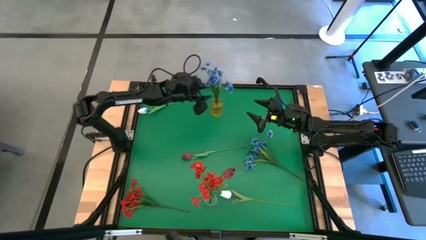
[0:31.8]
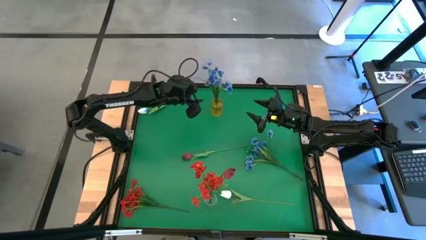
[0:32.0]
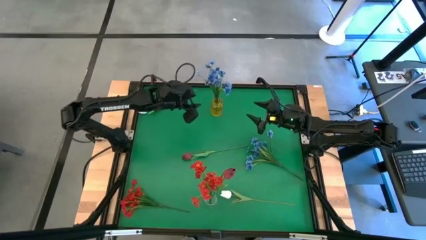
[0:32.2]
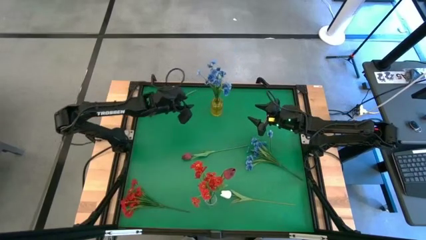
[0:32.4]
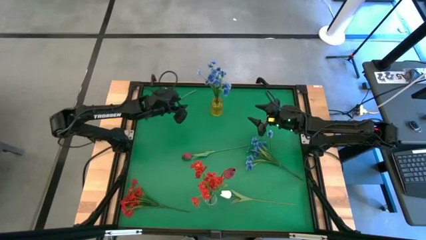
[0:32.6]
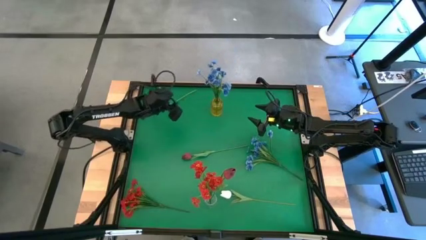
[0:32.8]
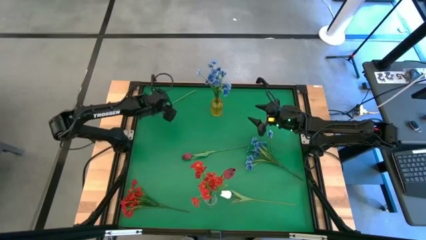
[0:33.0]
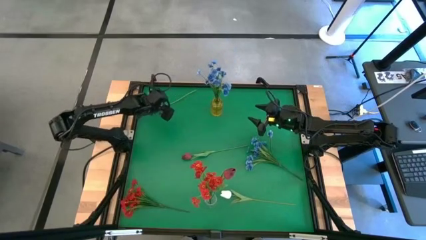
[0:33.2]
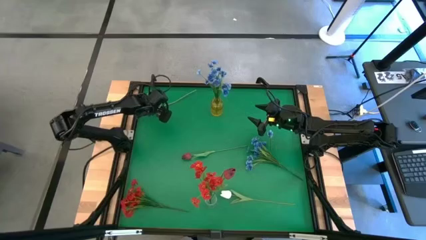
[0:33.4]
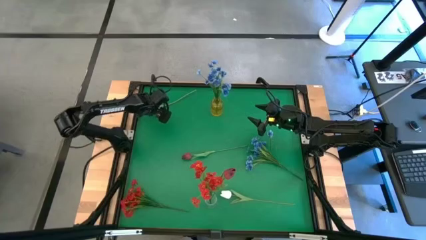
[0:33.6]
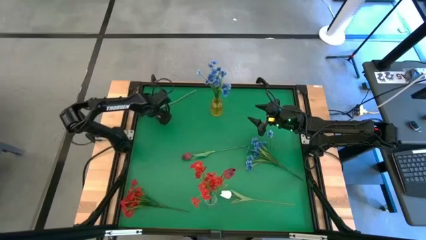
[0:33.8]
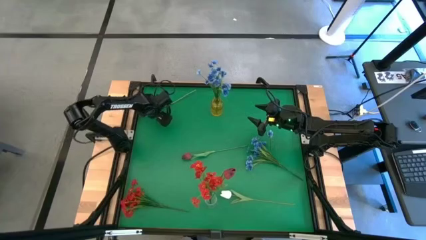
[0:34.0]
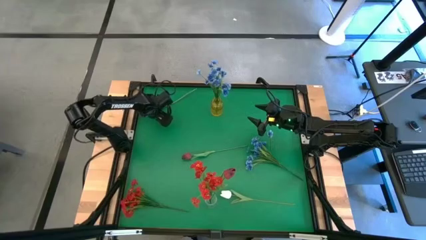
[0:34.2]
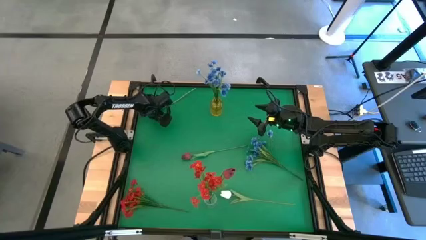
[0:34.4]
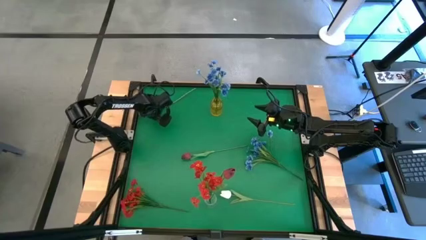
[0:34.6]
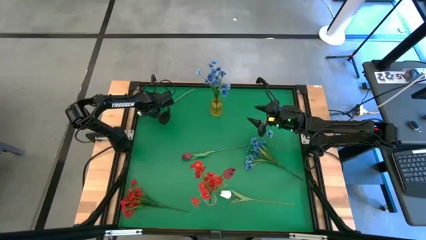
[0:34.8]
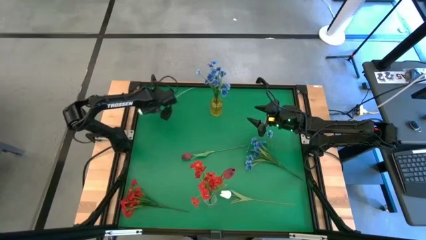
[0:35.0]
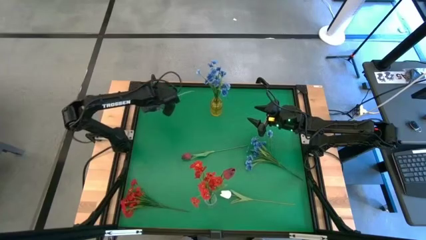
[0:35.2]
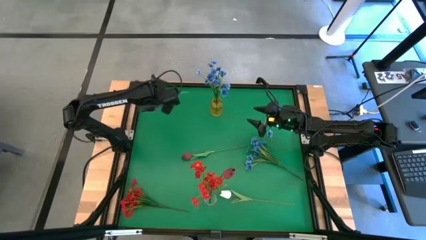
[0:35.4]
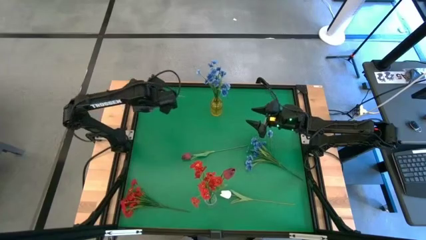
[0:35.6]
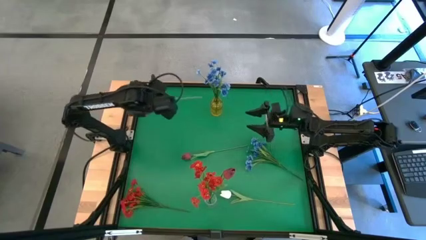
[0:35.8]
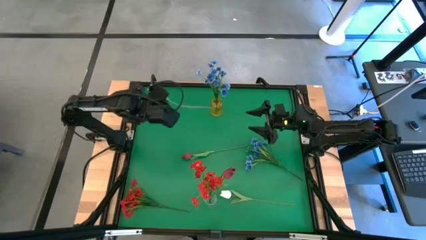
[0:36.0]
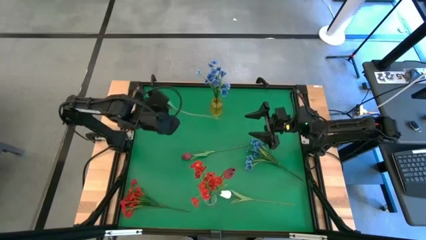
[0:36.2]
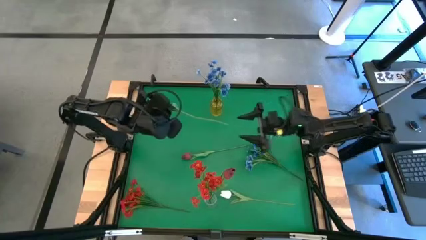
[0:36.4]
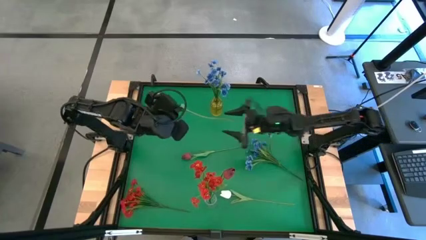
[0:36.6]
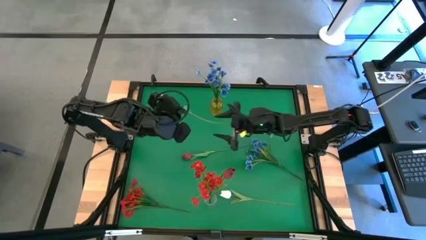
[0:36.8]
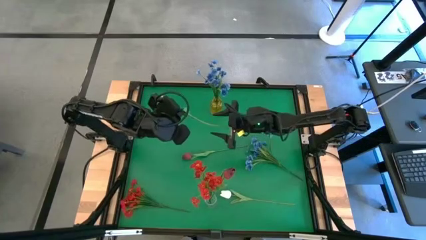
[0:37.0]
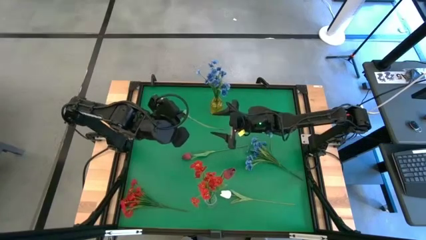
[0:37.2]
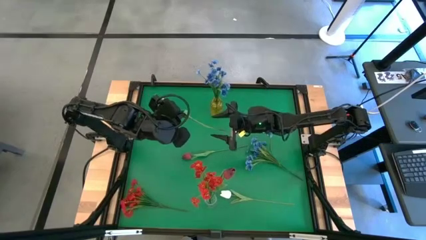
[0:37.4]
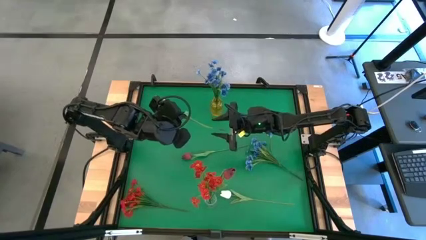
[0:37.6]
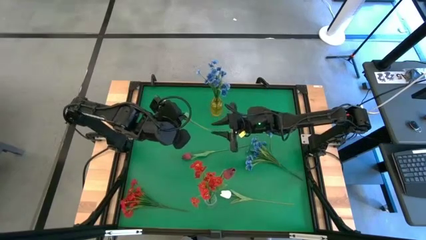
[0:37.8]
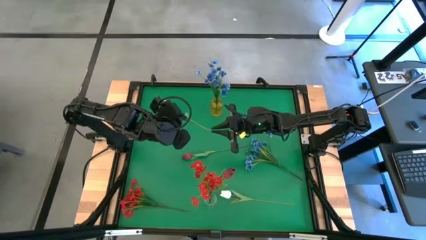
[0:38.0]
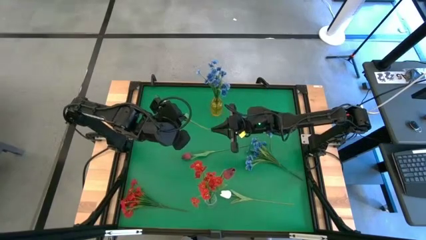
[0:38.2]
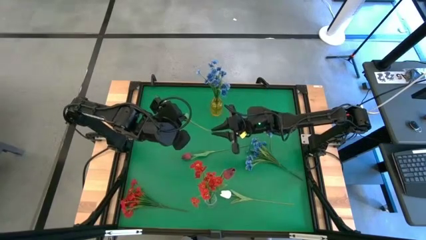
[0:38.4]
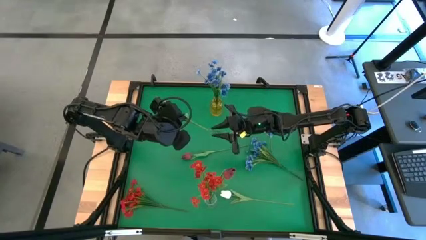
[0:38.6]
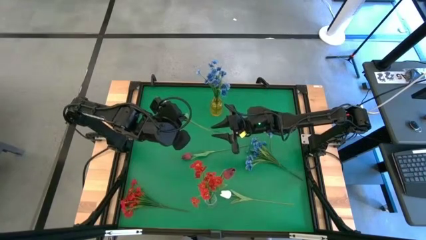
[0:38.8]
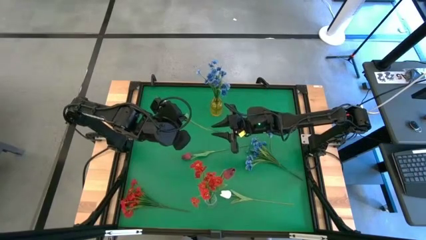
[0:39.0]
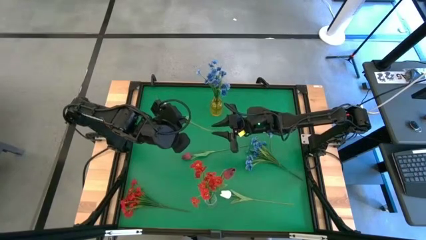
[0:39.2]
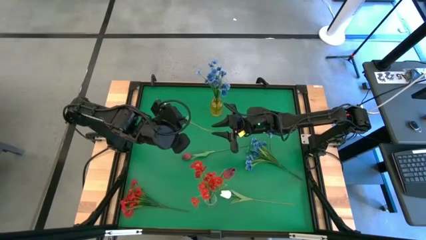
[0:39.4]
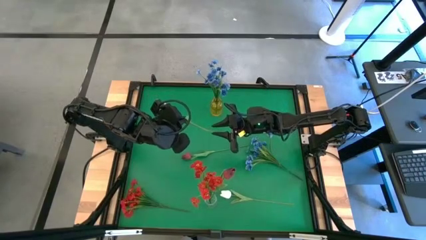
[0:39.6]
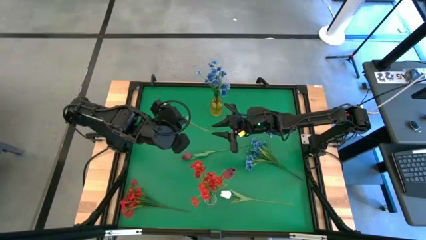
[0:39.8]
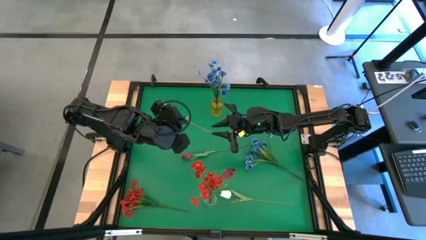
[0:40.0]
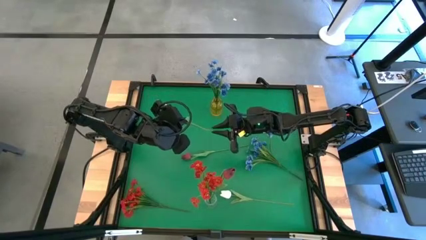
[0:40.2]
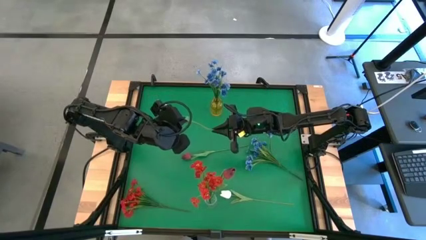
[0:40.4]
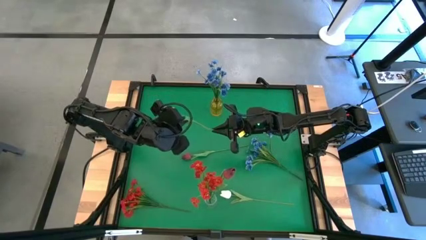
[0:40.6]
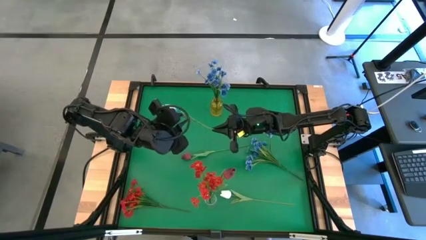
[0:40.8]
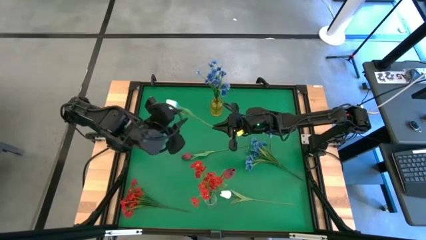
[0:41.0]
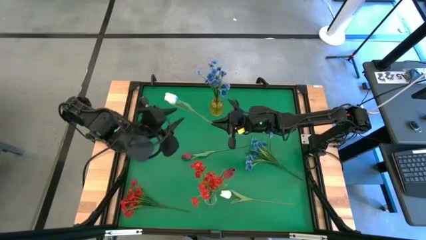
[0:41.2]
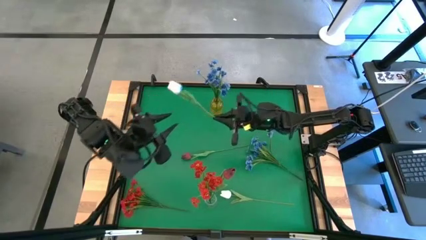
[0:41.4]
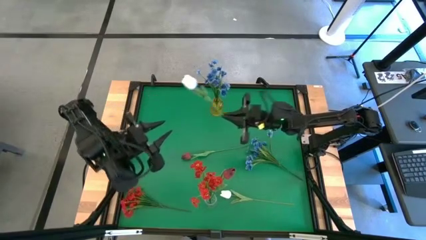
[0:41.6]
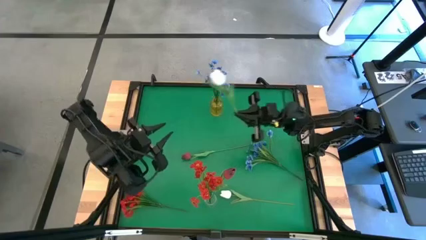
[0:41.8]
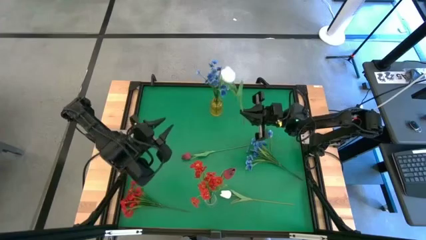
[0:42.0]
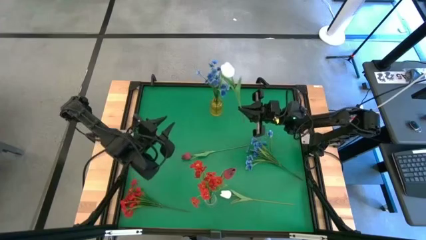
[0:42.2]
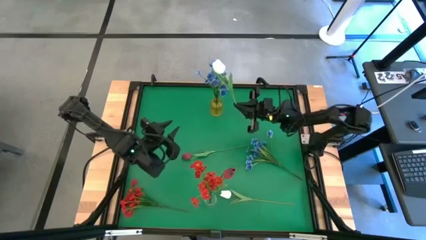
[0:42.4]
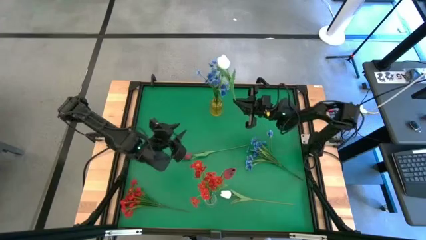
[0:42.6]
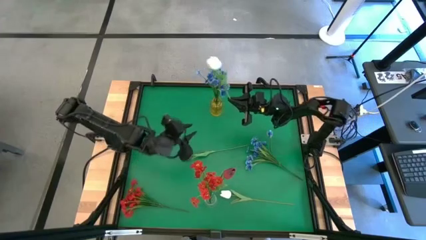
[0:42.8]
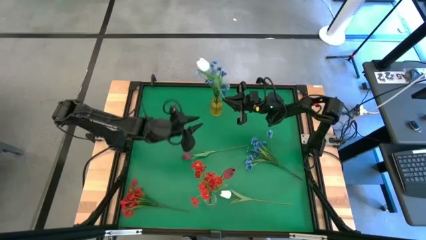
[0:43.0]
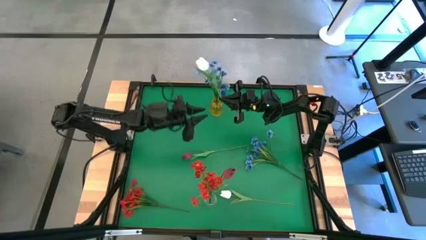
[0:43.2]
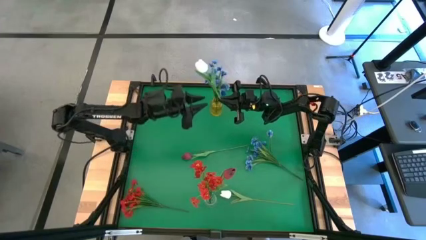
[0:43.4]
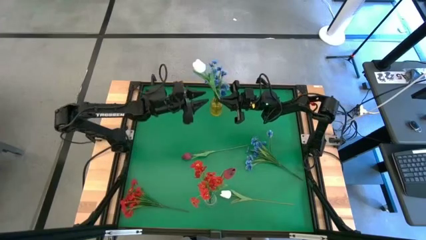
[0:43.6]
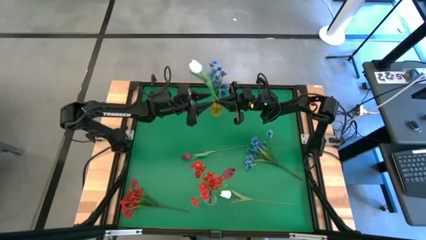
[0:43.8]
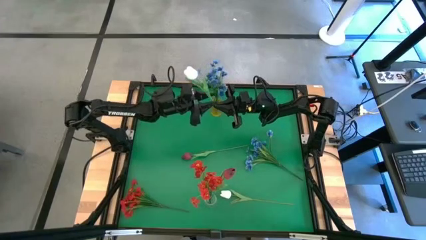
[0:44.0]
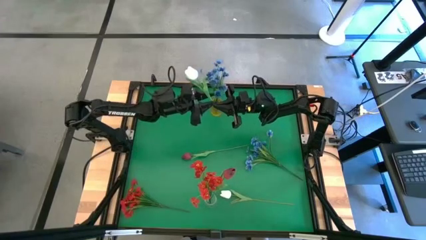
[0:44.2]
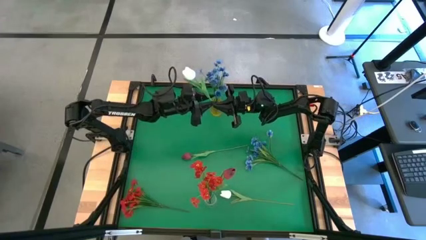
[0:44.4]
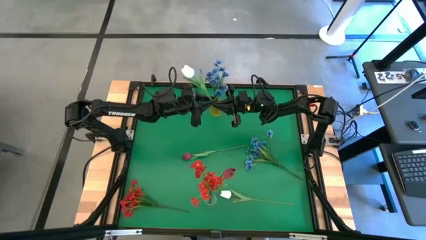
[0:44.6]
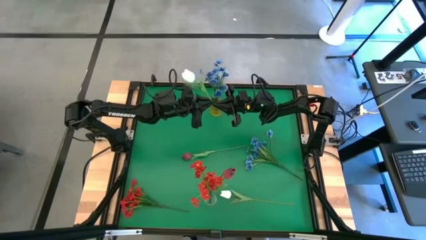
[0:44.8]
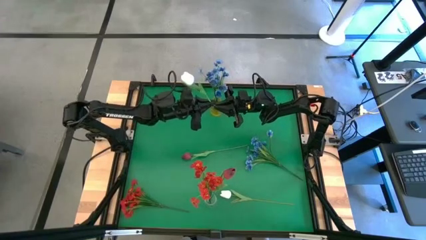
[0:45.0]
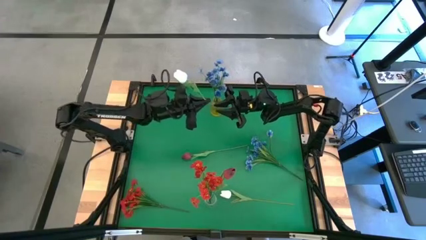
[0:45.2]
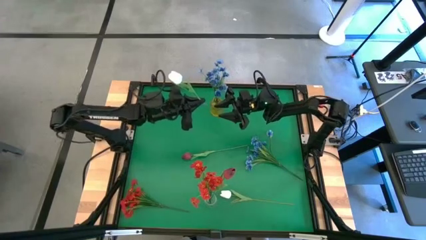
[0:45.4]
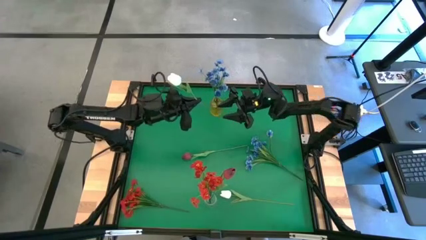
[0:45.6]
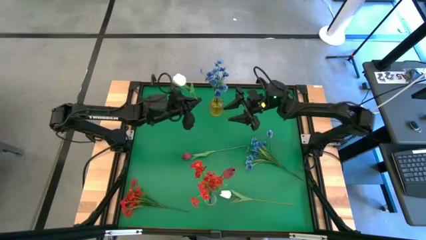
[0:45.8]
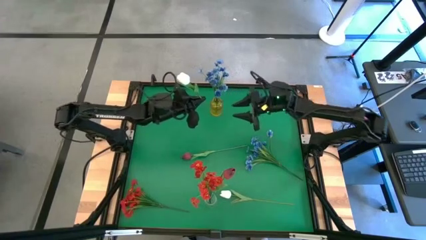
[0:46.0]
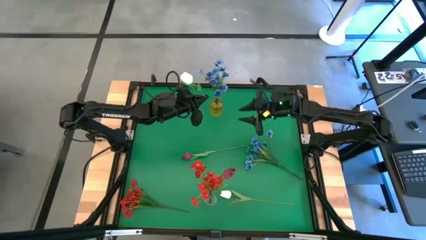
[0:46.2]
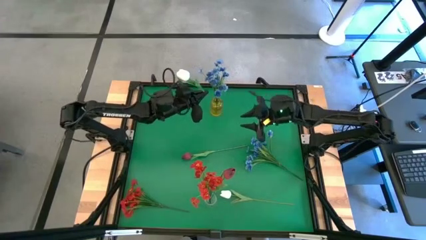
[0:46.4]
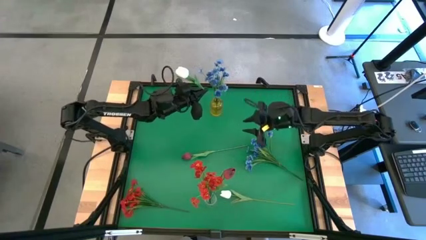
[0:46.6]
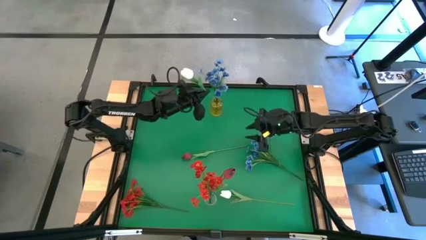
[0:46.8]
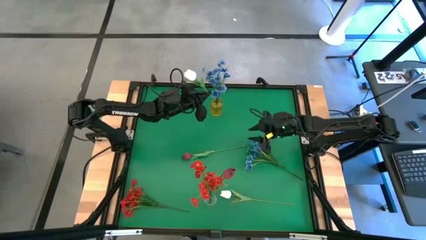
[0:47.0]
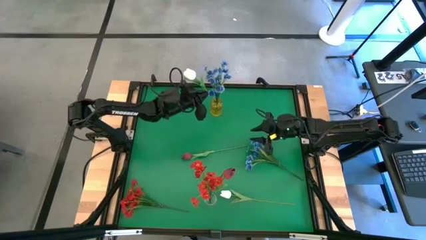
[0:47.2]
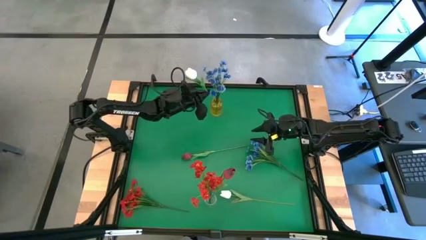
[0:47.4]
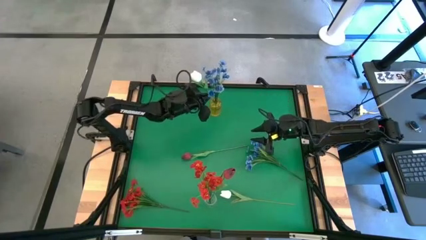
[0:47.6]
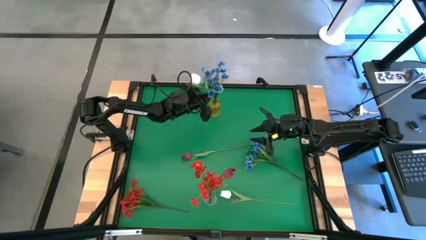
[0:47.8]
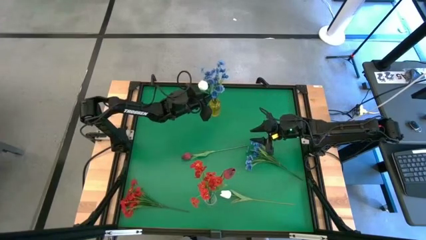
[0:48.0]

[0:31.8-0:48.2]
Task: Sort flowers into vase by color
Put the top white flower into the yellow vase
